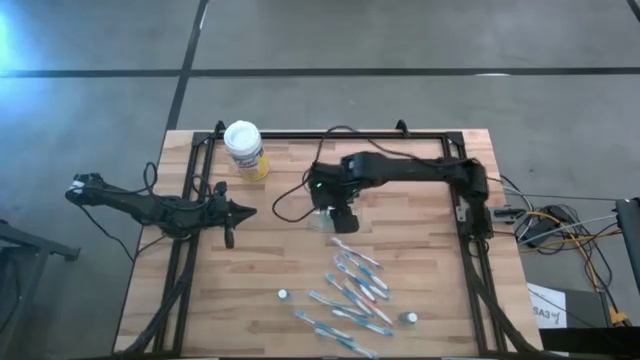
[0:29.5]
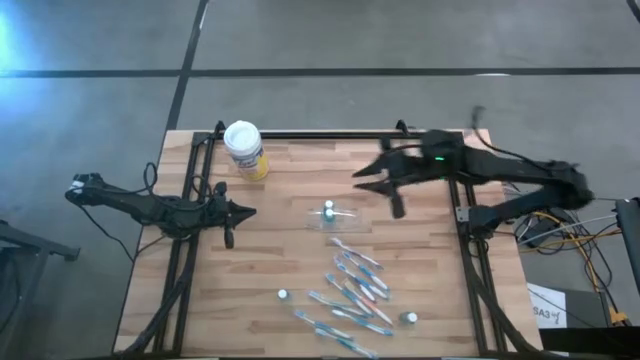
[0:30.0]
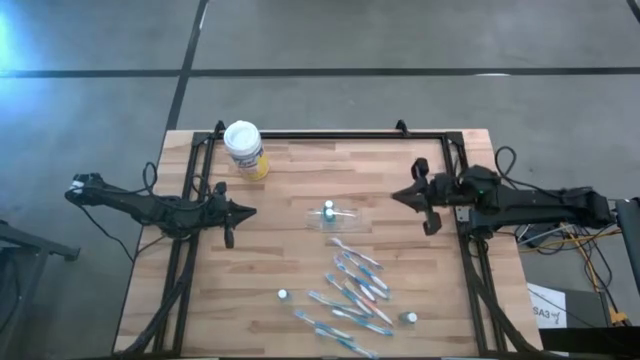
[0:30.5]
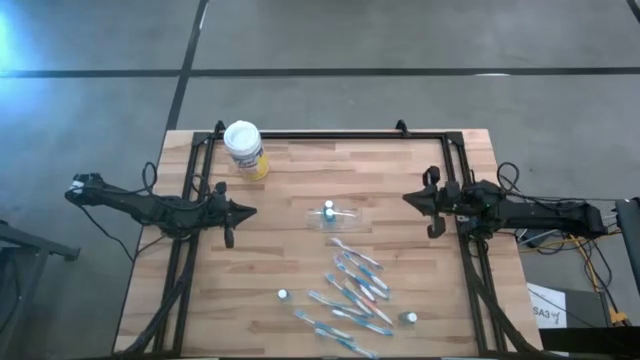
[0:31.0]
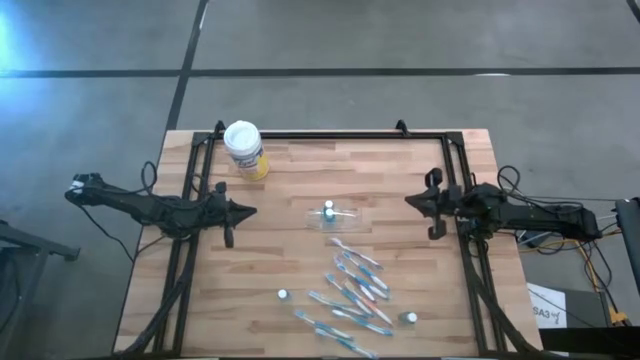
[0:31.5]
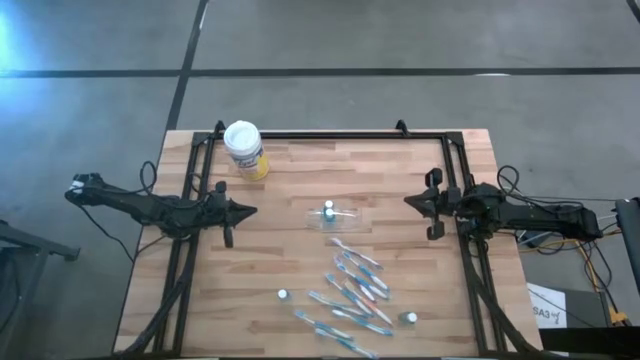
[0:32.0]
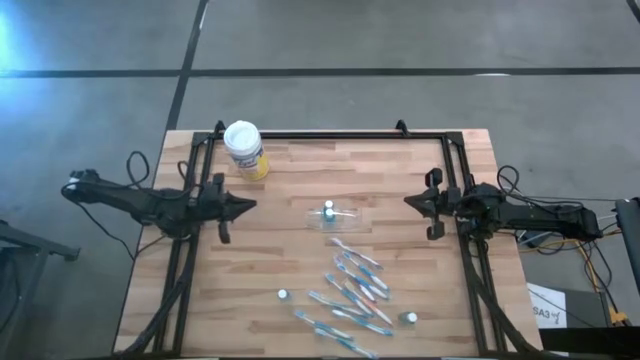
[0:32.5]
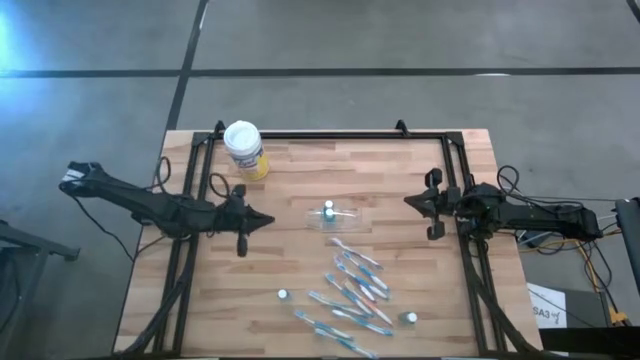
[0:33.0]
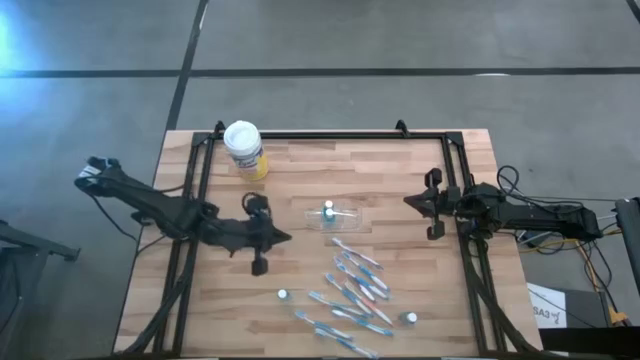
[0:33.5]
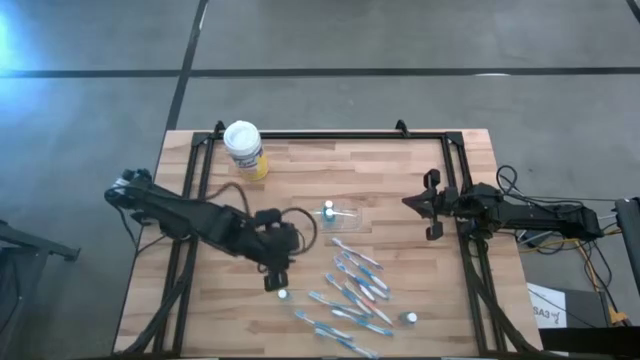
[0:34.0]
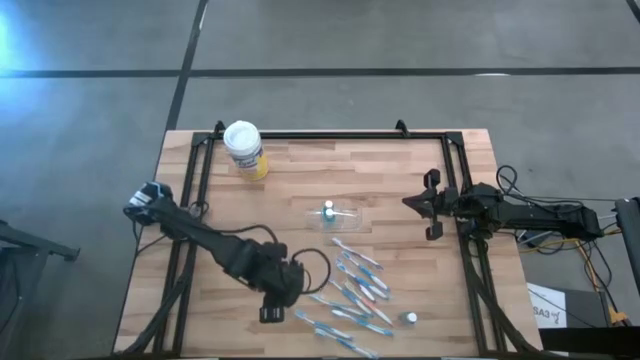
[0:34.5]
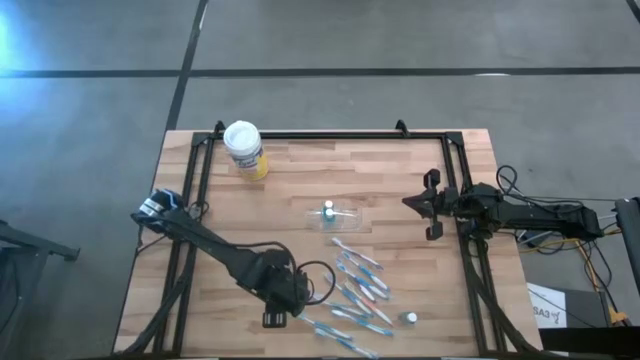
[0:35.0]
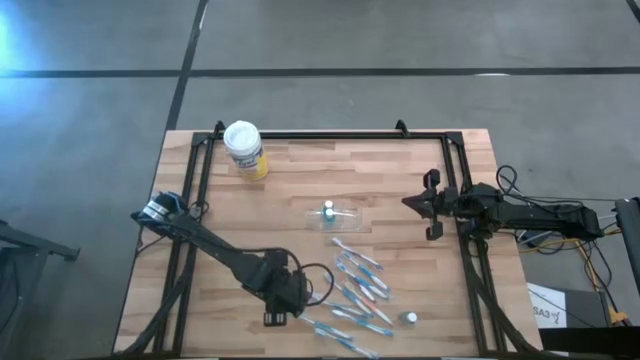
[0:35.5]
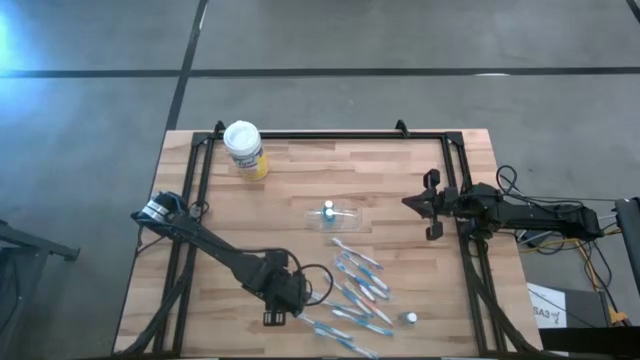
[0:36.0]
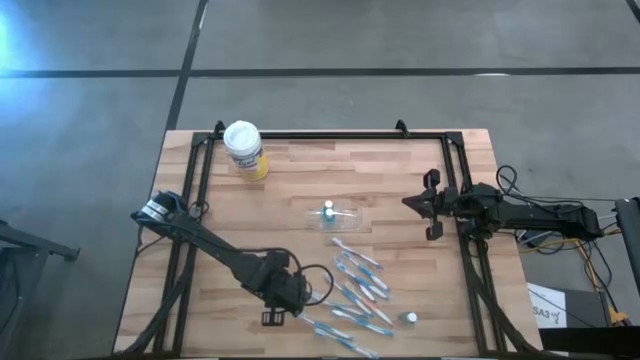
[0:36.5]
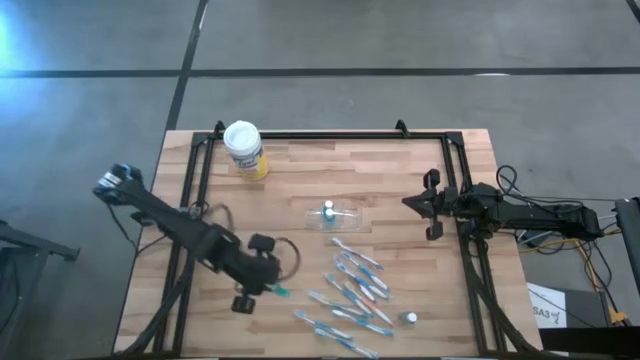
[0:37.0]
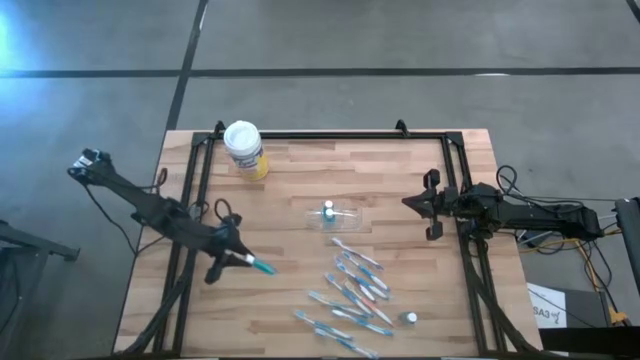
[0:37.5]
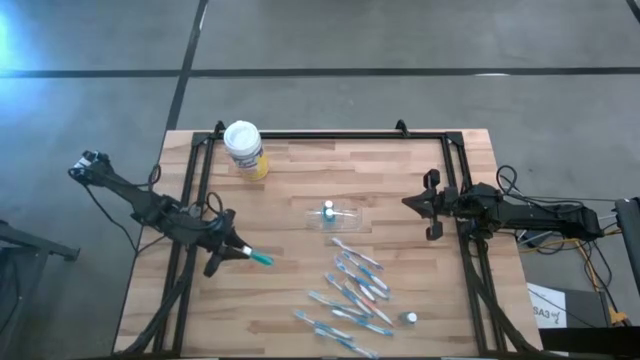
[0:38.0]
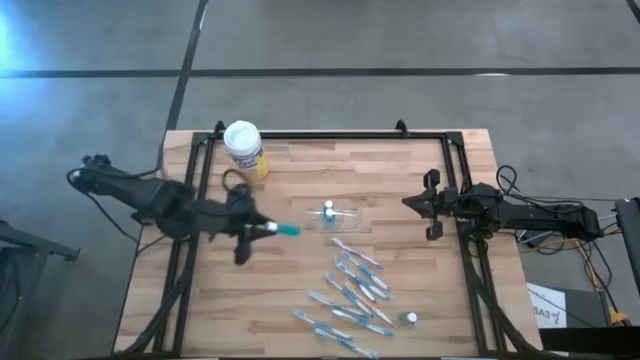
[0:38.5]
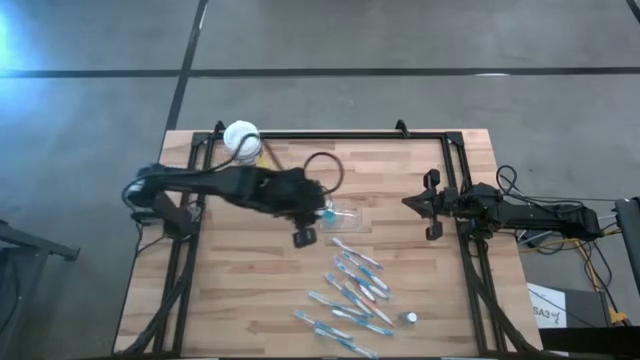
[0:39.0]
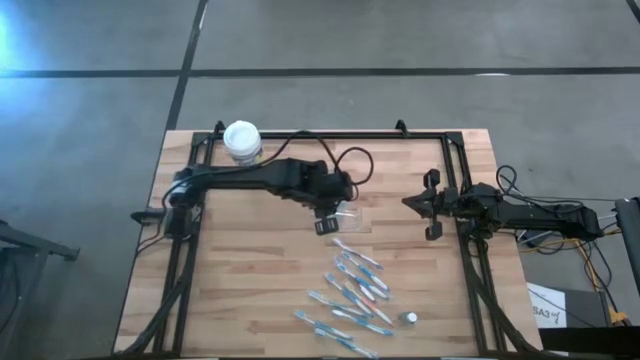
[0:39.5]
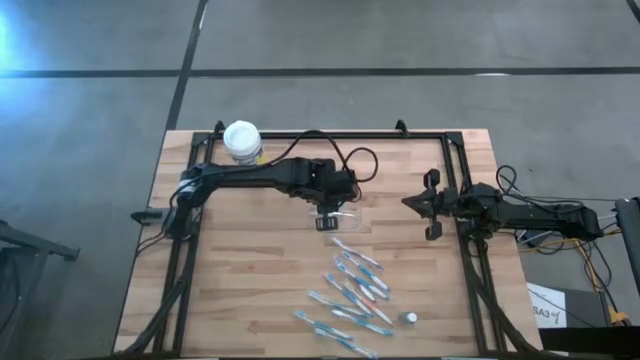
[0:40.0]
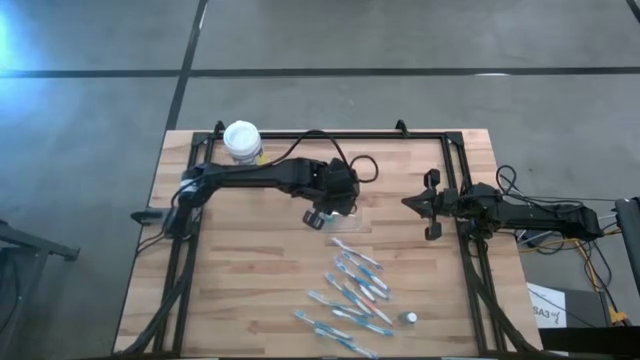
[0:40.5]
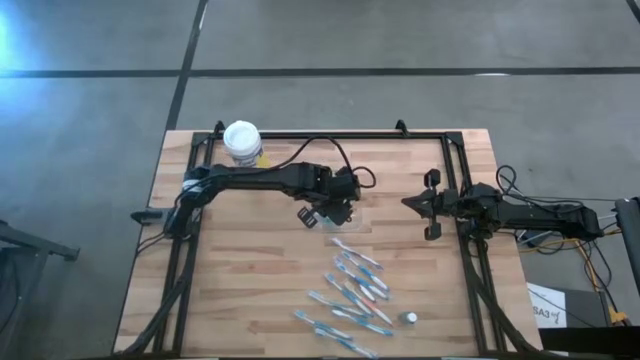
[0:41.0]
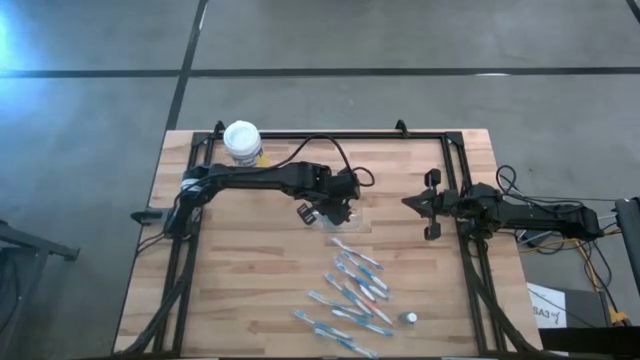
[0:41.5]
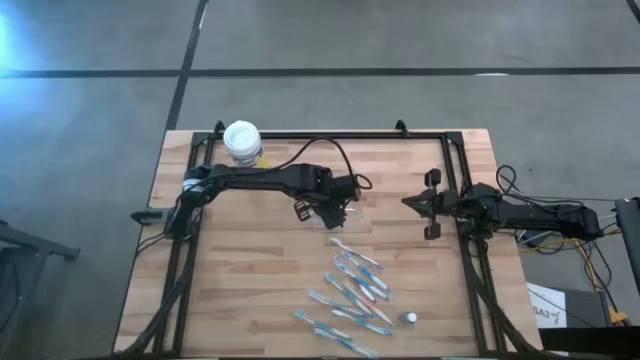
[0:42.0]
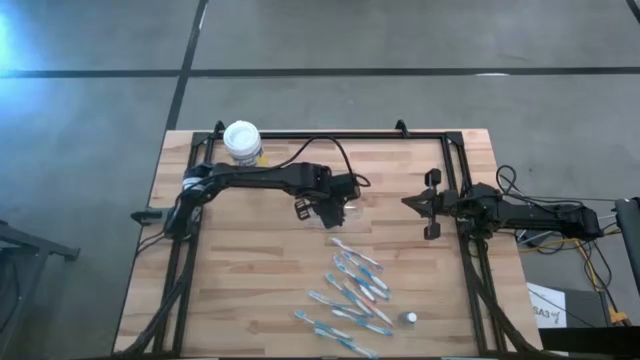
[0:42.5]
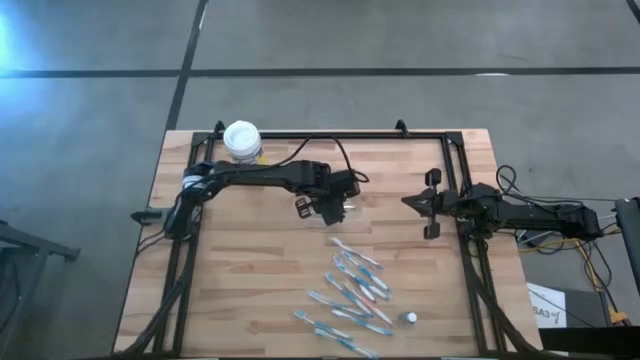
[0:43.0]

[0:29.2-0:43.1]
Task: Pick & Place toothbrushing station
Put the blue mouthwash bottle into the middle compartment of the transparent organizer

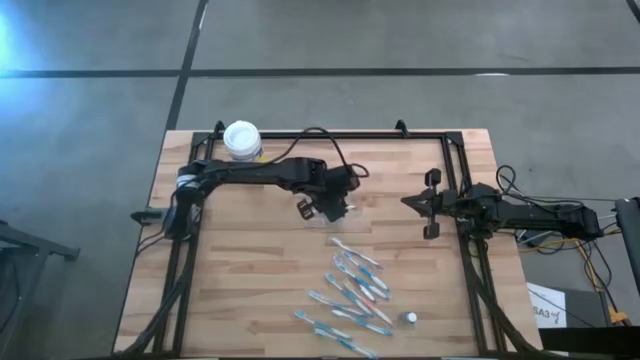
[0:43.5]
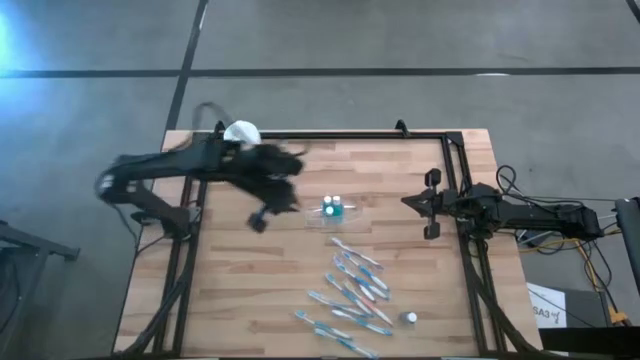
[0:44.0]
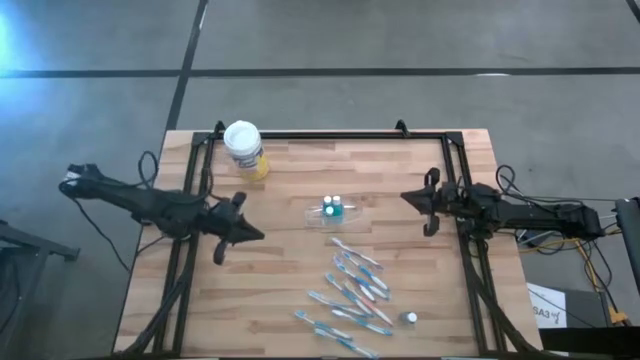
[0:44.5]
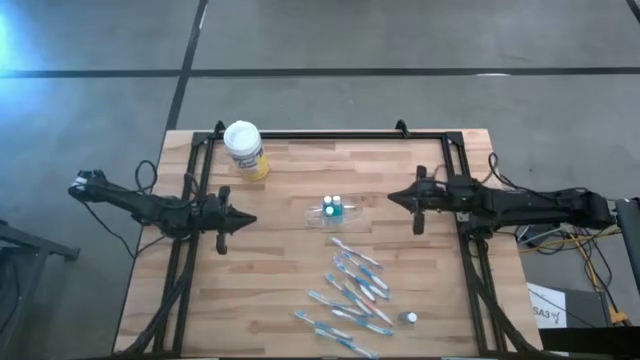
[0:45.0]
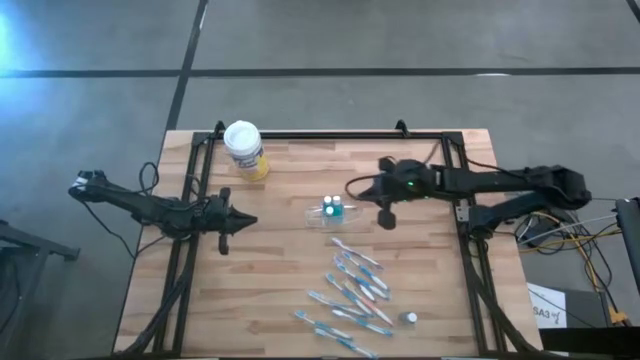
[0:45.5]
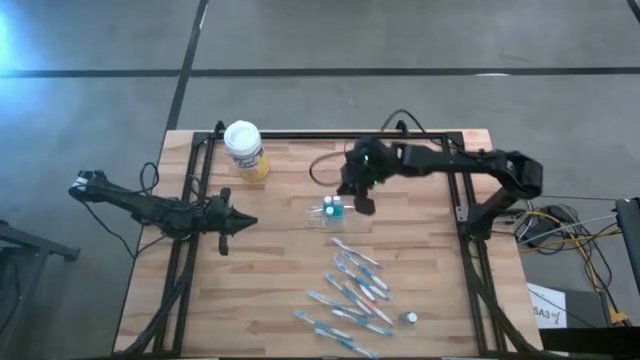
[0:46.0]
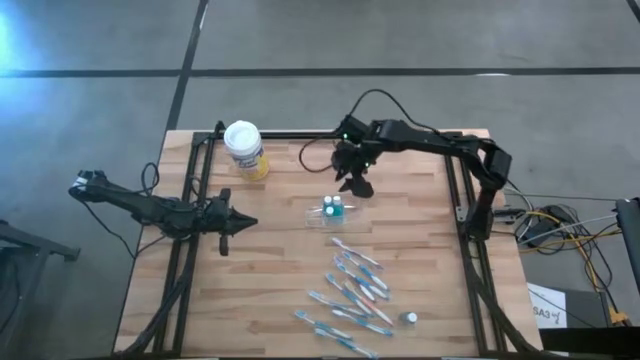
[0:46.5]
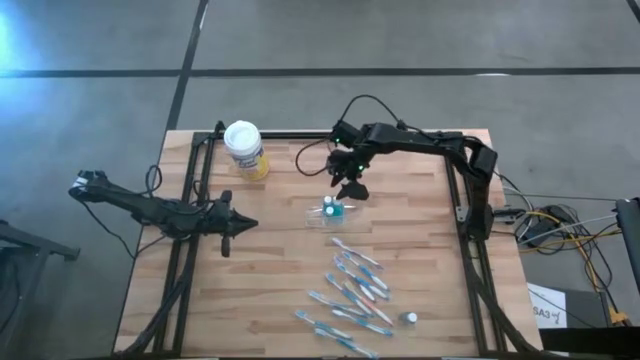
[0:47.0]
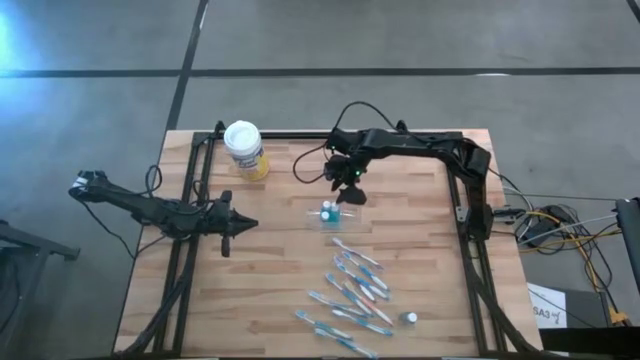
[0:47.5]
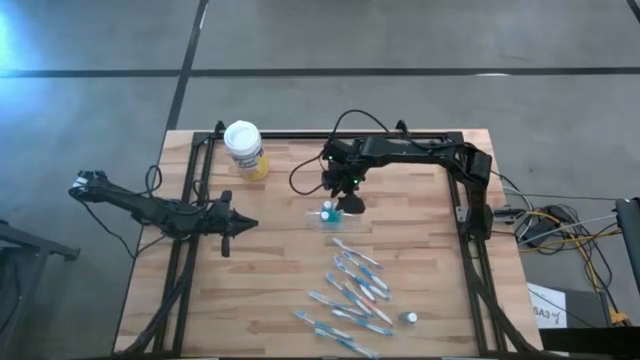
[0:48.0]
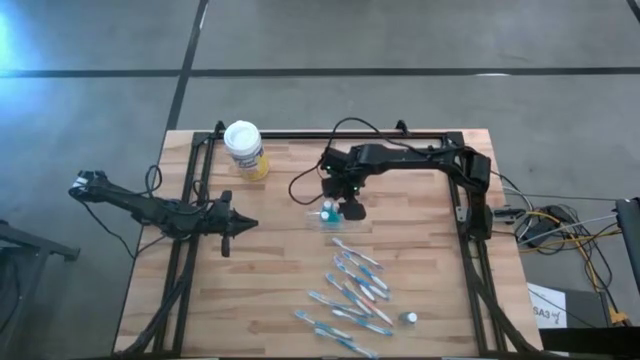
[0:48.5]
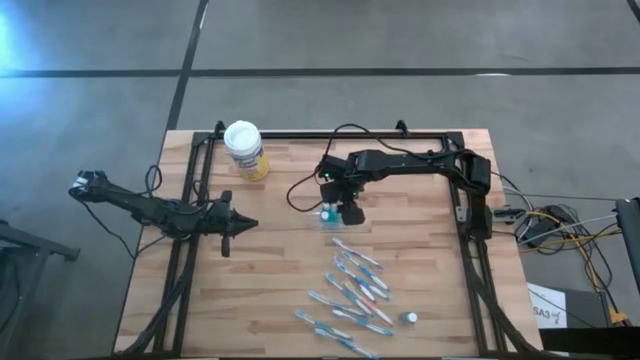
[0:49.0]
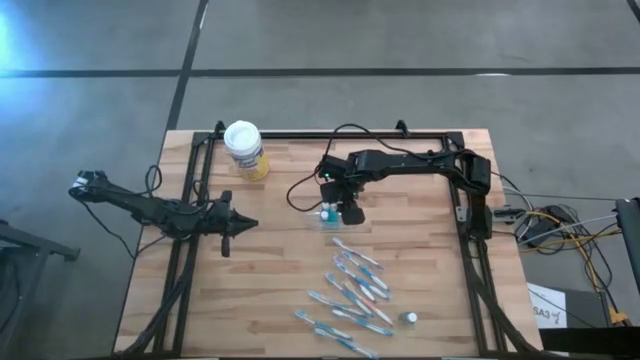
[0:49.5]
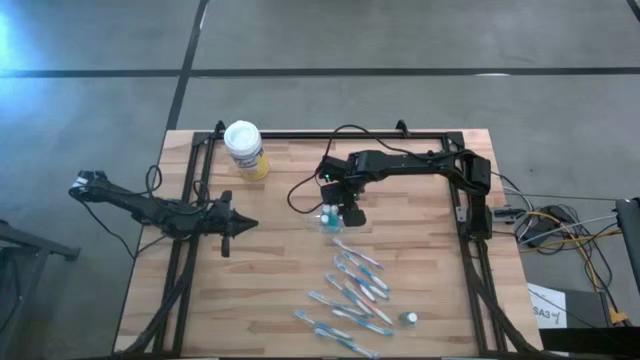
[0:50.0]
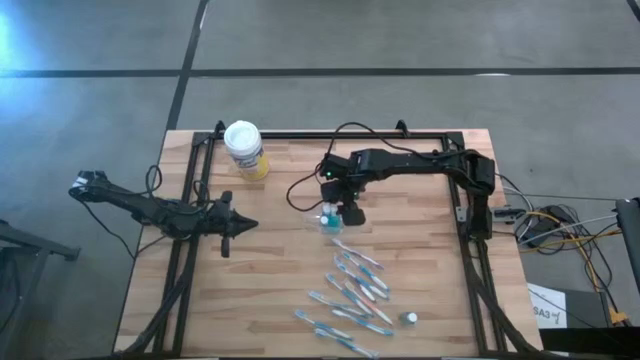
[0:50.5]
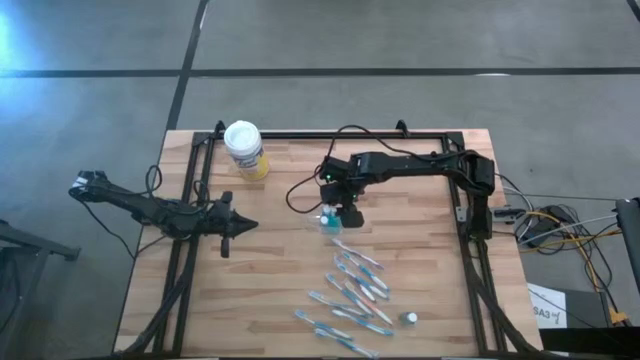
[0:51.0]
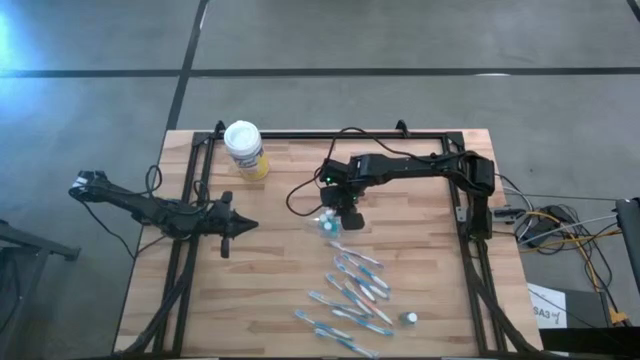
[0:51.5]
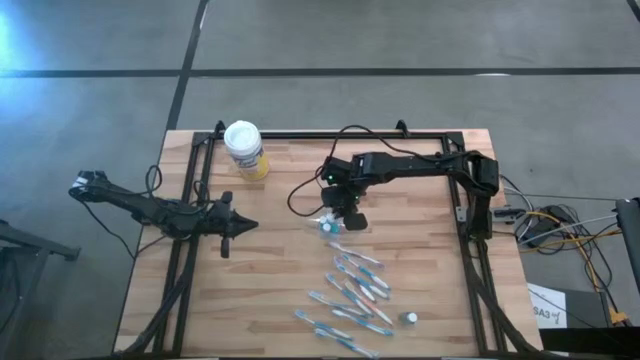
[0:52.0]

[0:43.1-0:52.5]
Adjust the blue mouthwash bottles in the middle compartment of the transparent organizer
